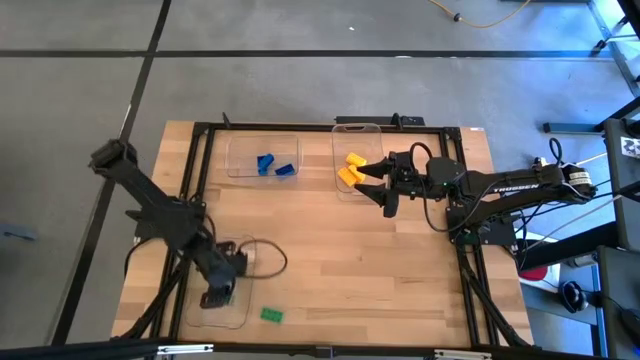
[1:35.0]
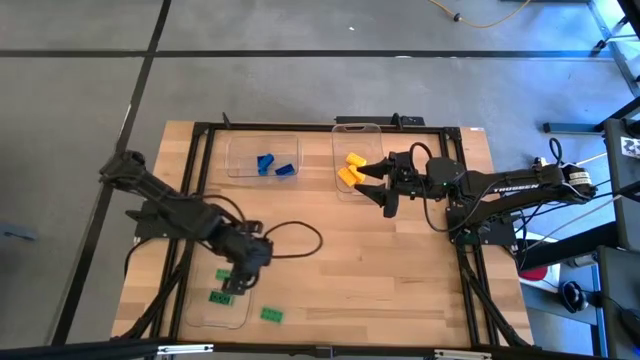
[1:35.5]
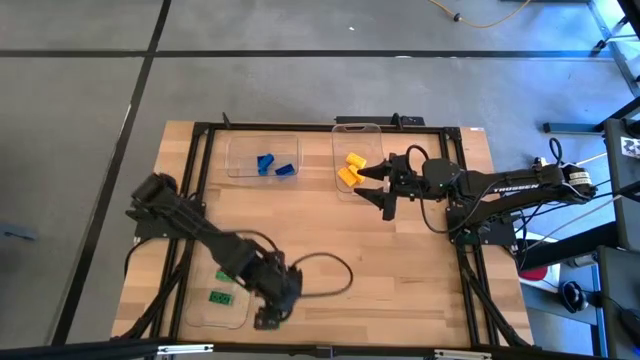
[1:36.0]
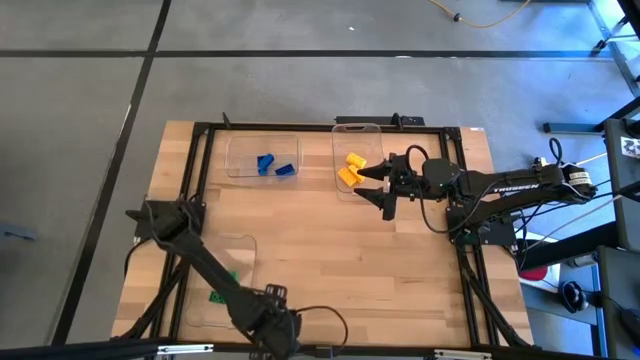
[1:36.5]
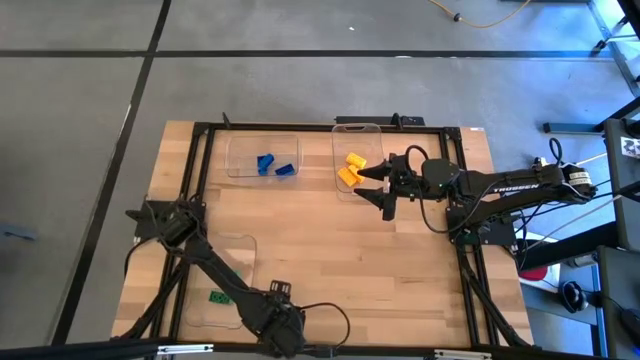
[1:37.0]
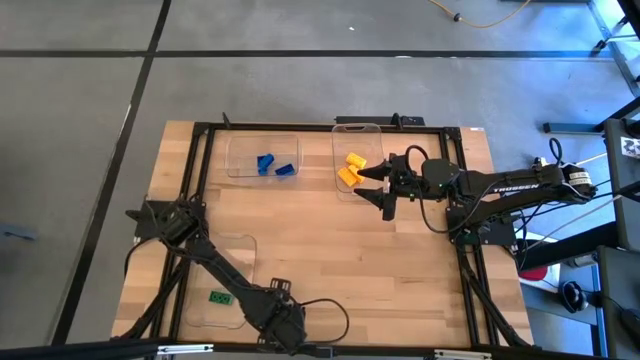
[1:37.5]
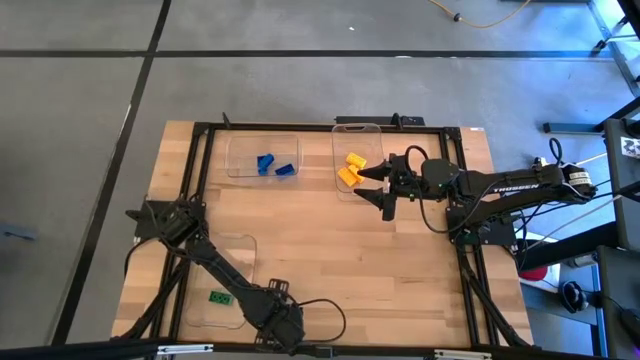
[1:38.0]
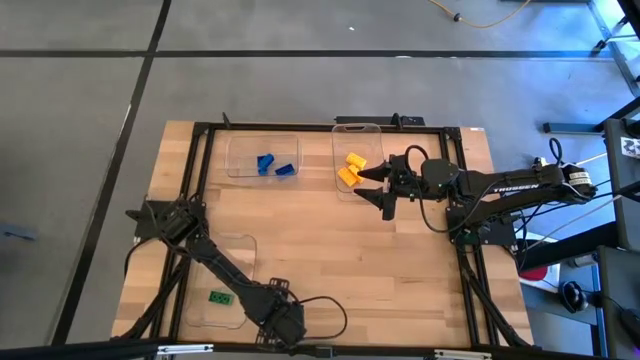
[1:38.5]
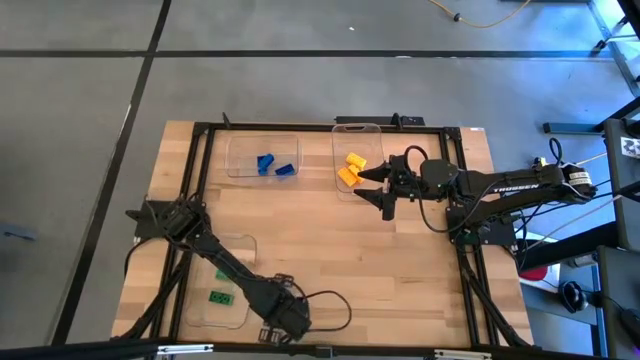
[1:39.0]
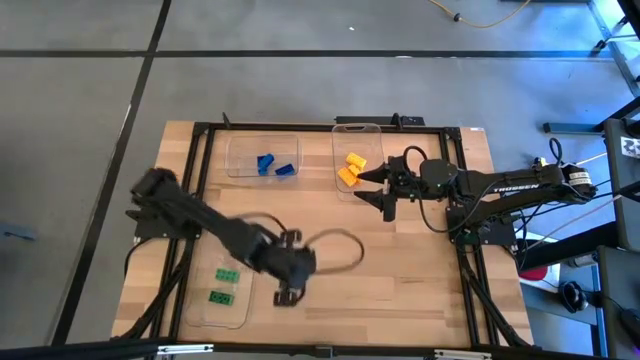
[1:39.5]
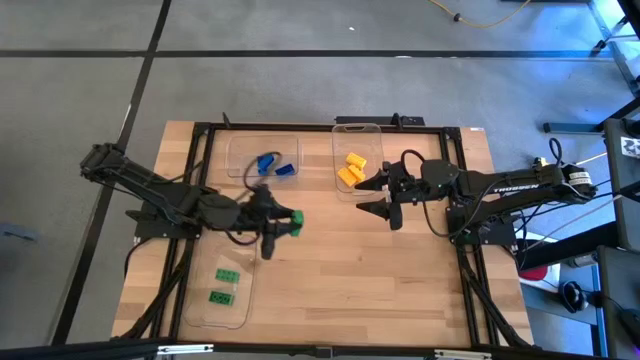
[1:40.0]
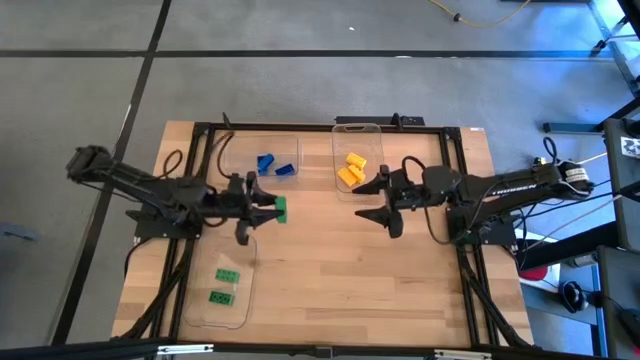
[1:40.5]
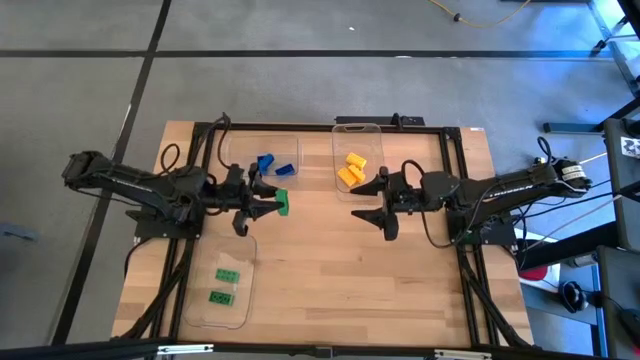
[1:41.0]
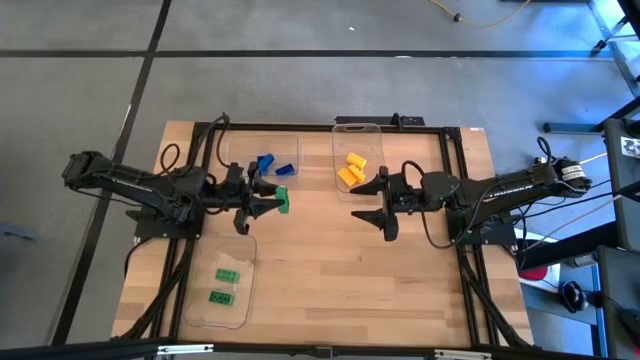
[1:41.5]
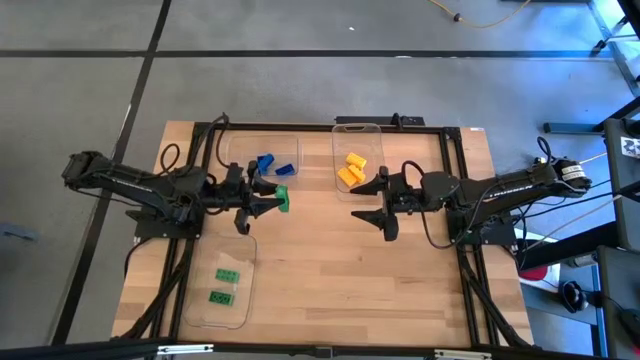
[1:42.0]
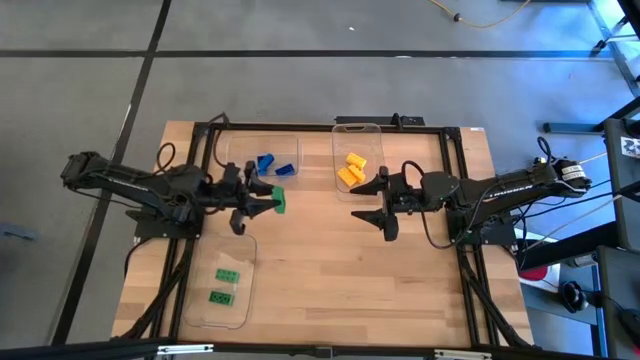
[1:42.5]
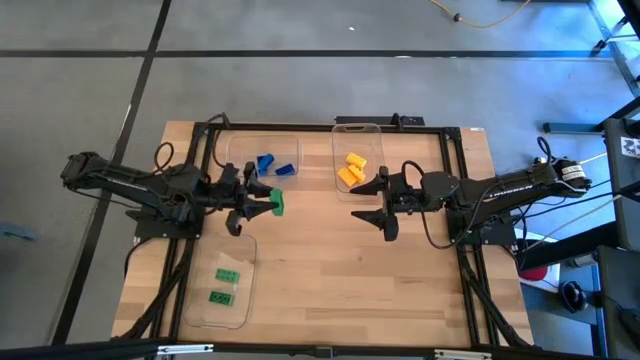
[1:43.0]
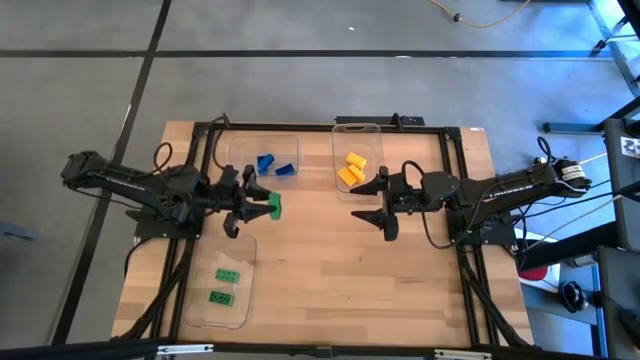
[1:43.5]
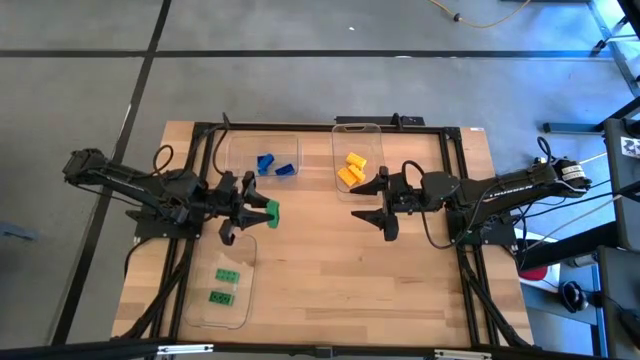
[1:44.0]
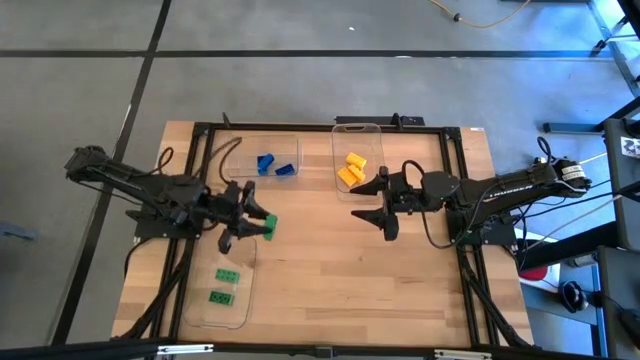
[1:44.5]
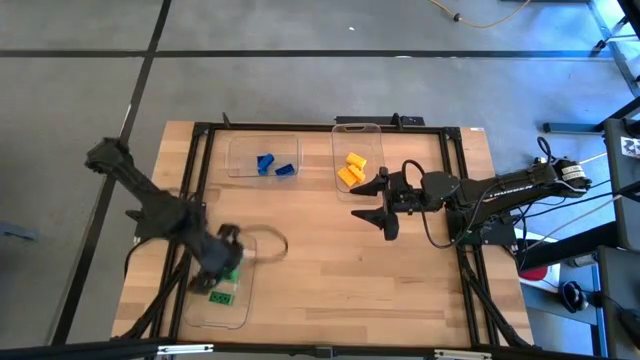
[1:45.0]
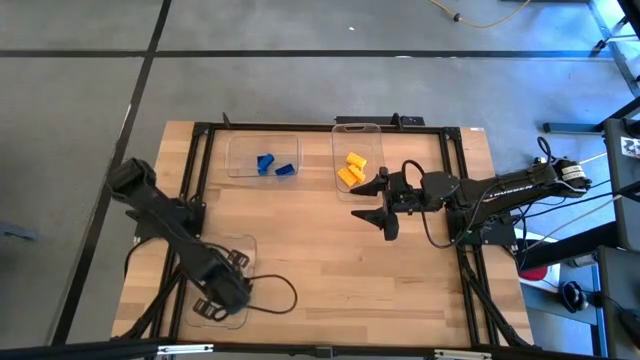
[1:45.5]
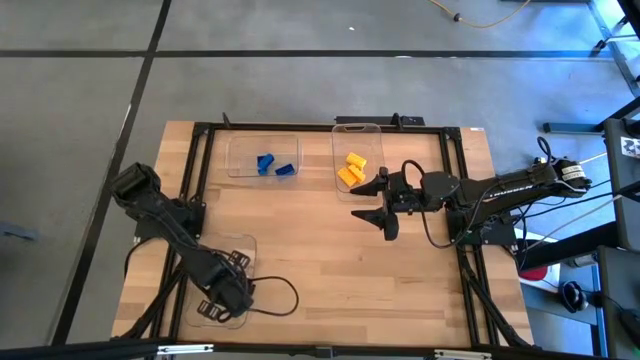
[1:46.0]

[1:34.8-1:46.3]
Task: Sort & place blocks by color
Put the green game piece into the bottom left transparent bin

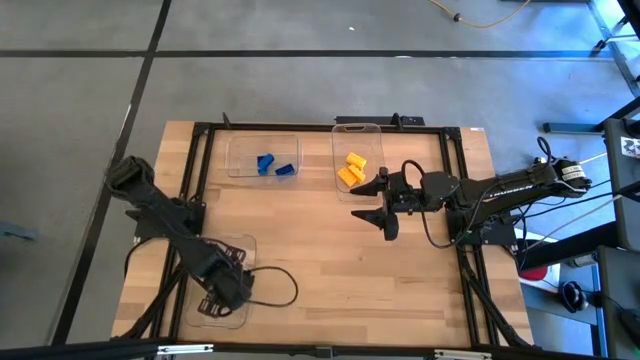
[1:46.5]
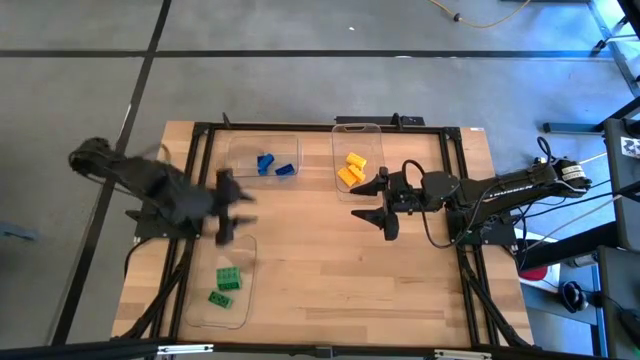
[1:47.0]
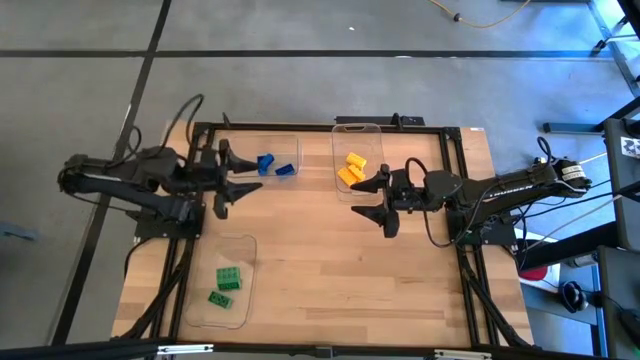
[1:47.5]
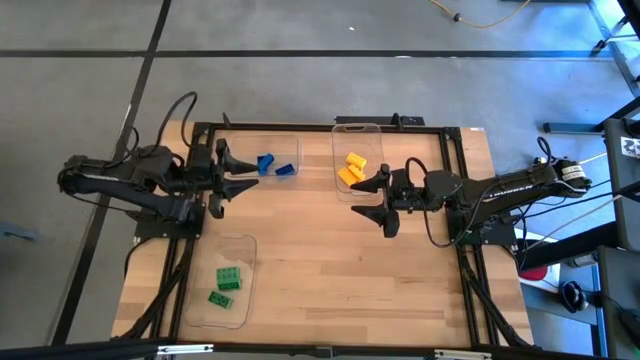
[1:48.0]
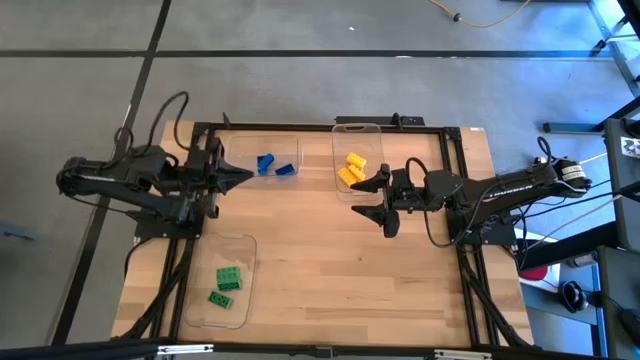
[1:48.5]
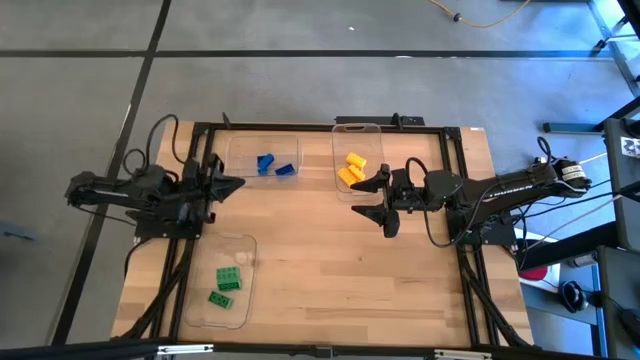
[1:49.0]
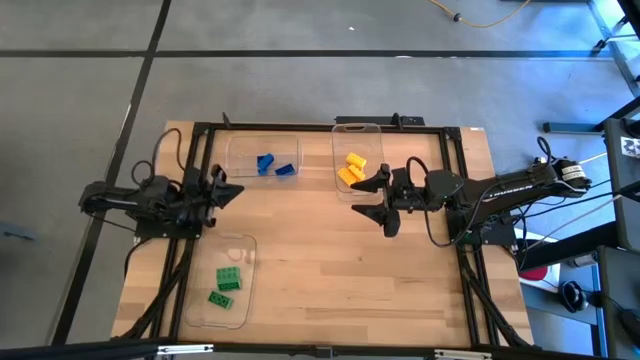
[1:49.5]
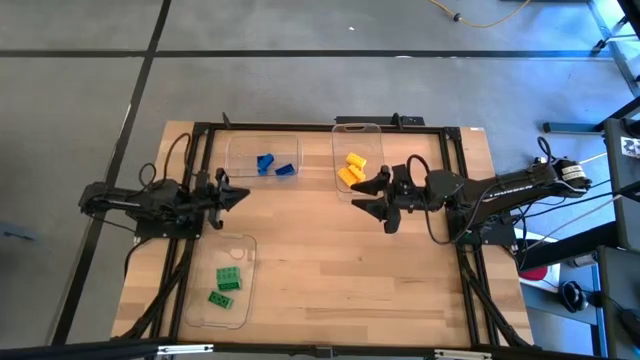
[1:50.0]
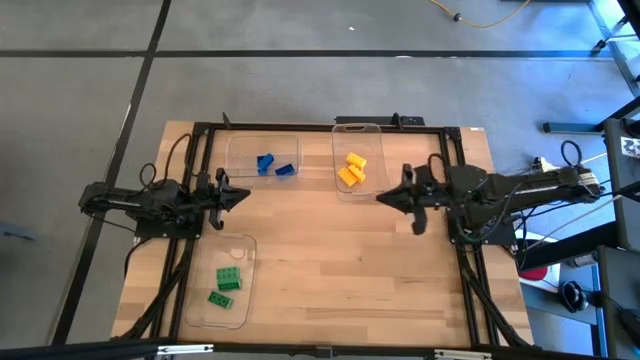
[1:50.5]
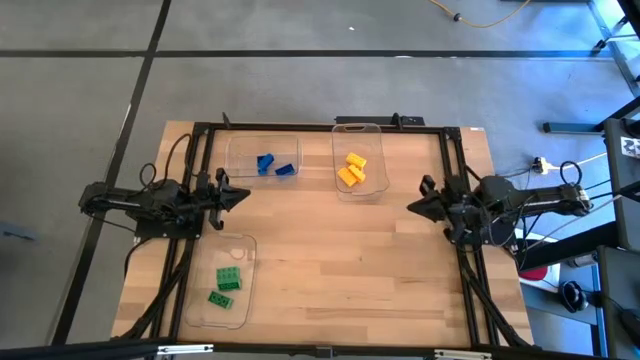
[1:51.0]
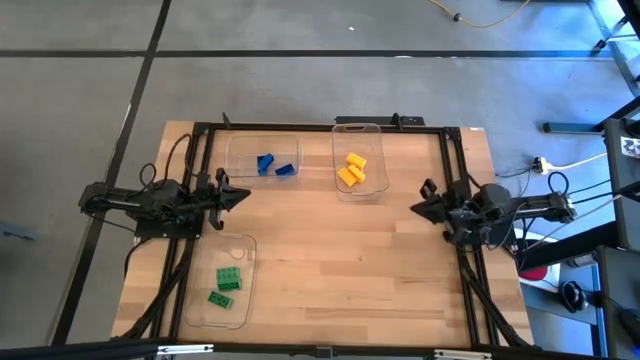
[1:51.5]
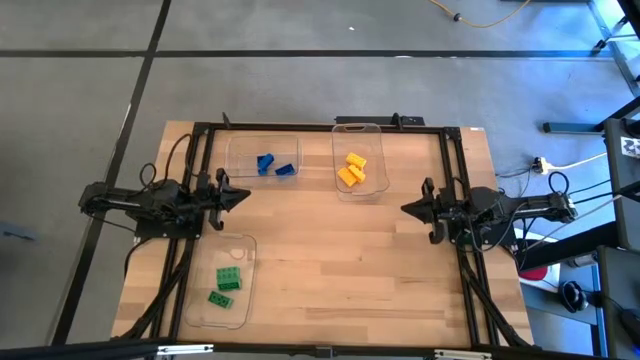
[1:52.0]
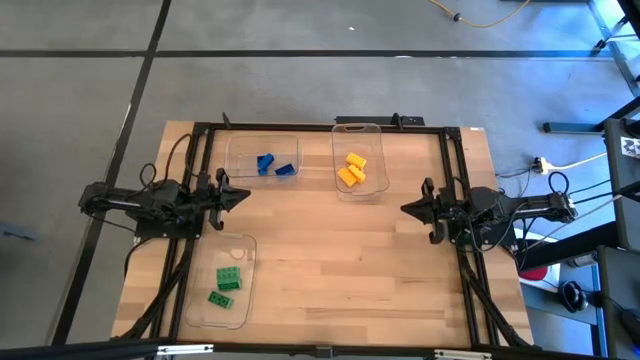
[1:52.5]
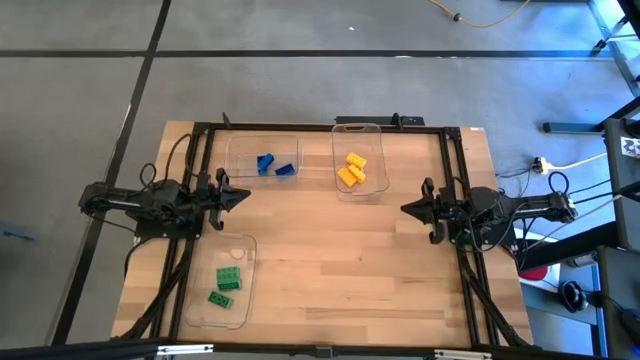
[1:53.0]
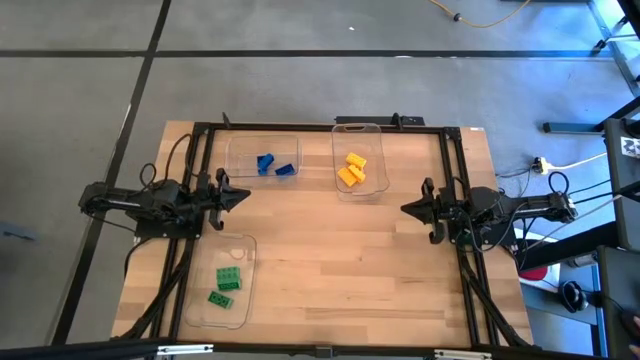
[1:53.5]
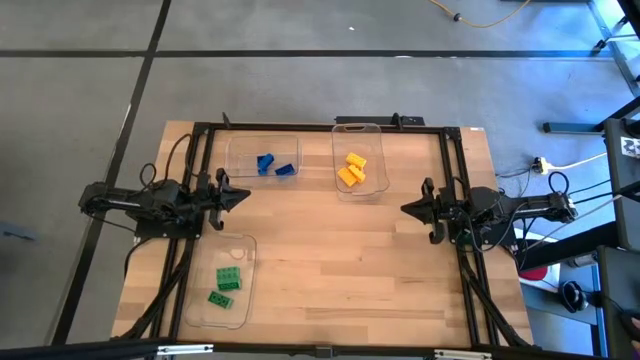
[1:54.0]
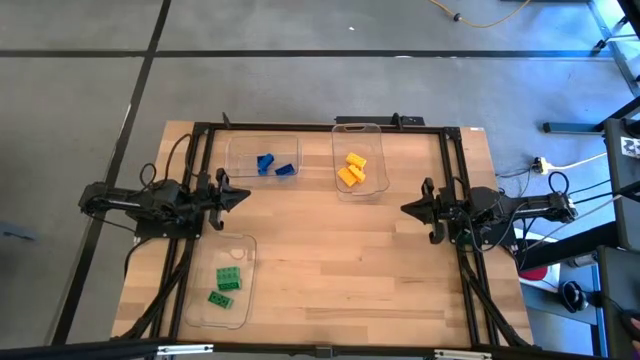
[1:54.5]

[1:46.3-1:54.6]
Return to Home Position
